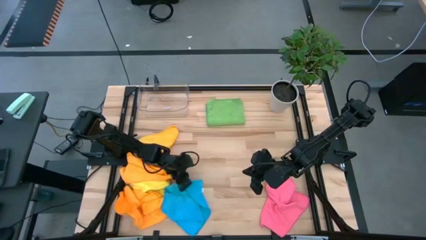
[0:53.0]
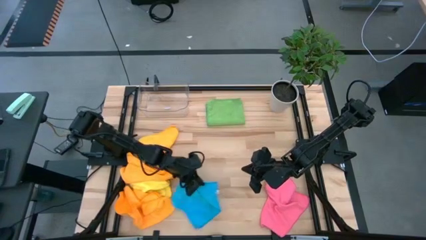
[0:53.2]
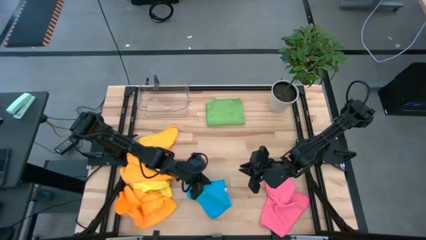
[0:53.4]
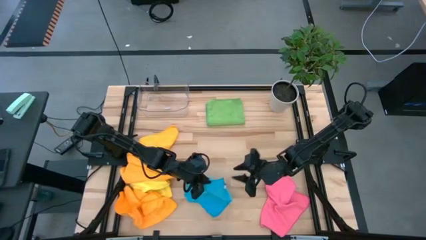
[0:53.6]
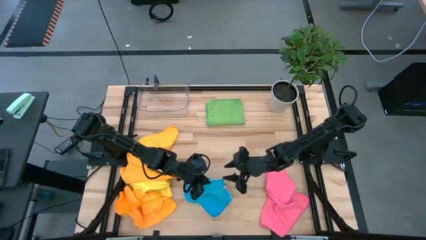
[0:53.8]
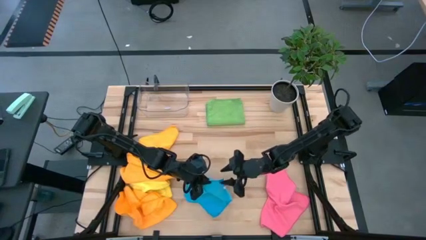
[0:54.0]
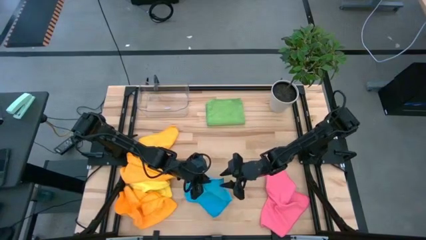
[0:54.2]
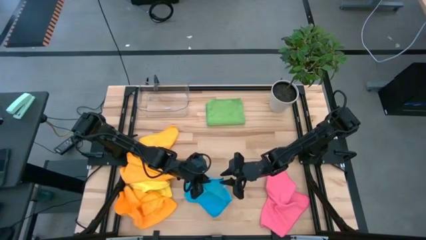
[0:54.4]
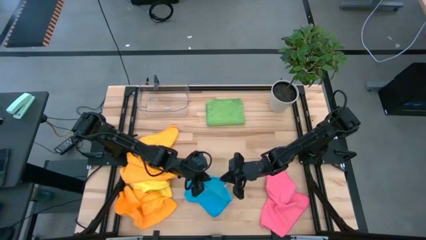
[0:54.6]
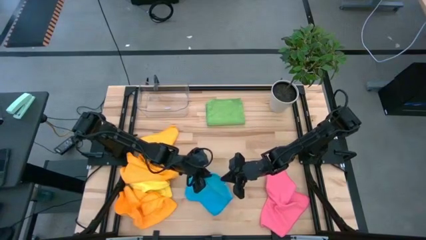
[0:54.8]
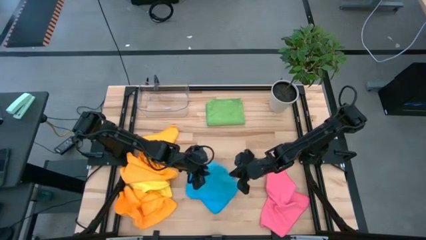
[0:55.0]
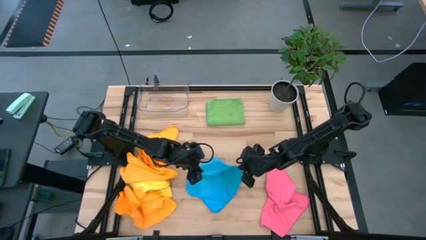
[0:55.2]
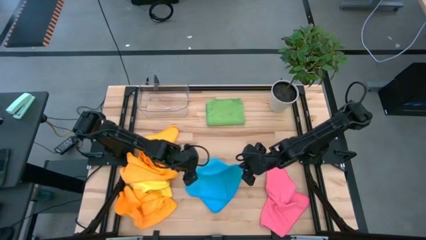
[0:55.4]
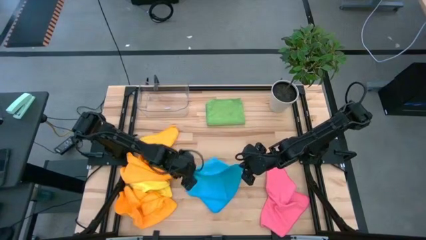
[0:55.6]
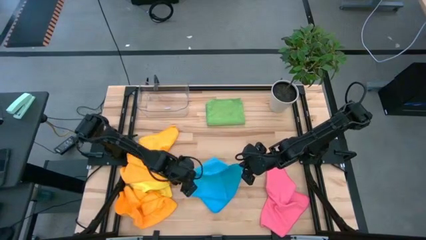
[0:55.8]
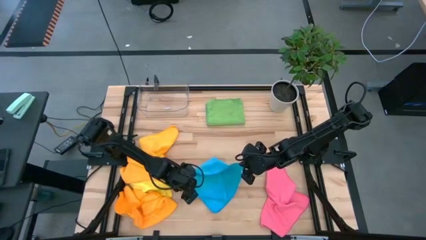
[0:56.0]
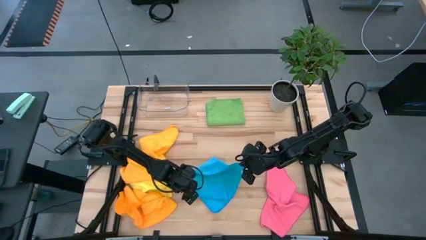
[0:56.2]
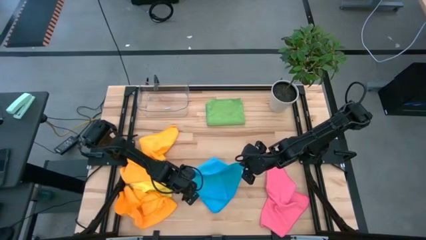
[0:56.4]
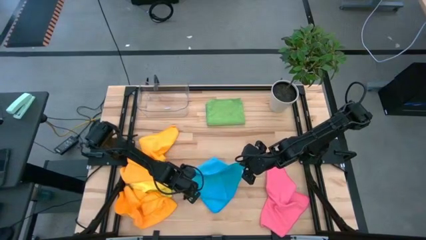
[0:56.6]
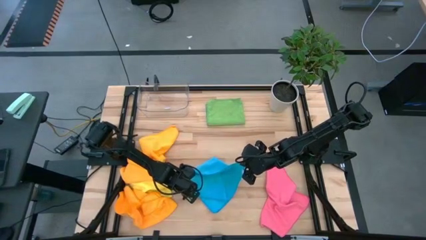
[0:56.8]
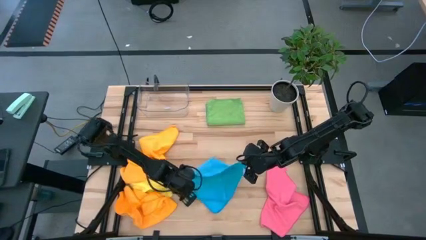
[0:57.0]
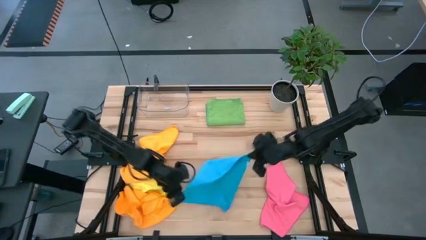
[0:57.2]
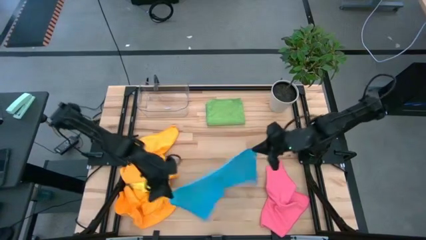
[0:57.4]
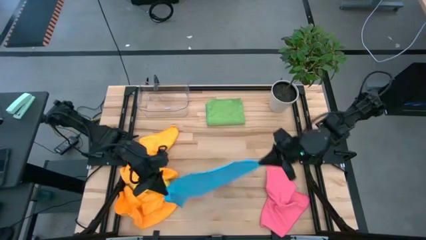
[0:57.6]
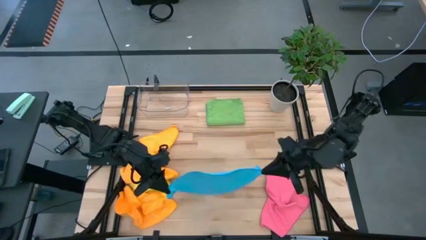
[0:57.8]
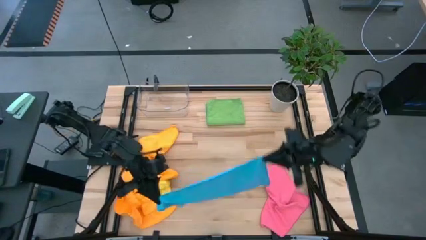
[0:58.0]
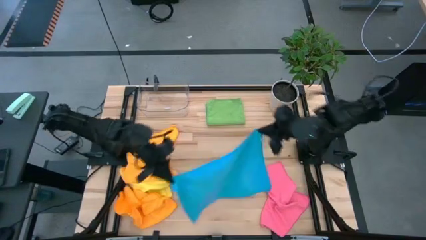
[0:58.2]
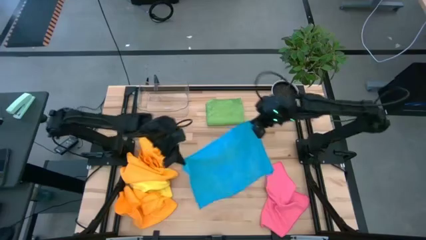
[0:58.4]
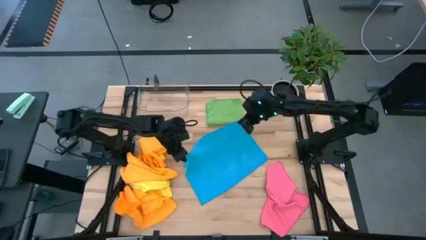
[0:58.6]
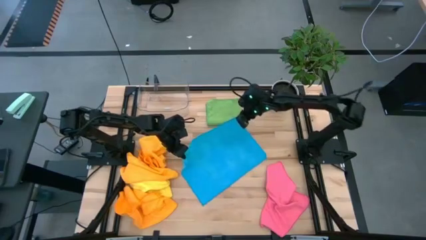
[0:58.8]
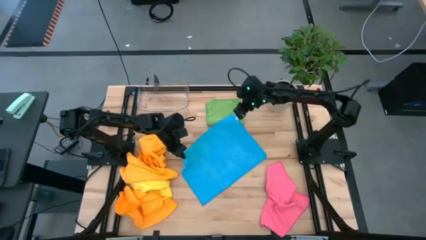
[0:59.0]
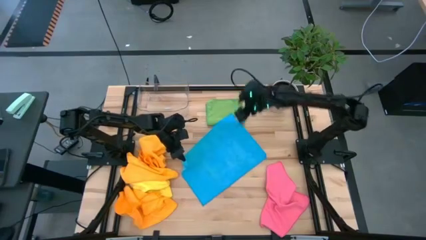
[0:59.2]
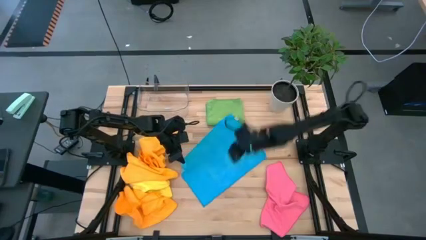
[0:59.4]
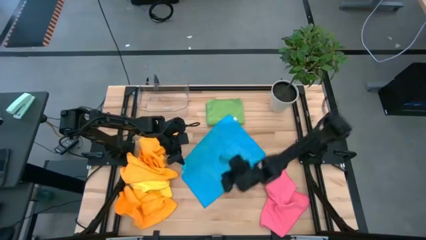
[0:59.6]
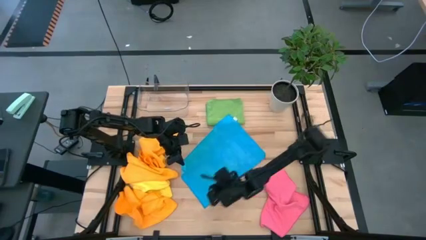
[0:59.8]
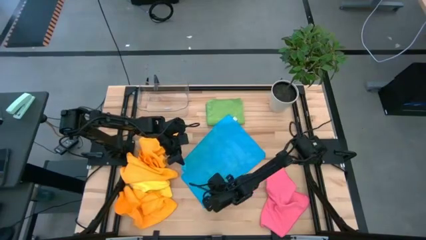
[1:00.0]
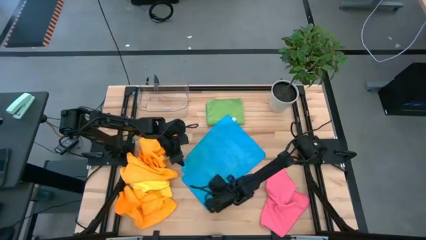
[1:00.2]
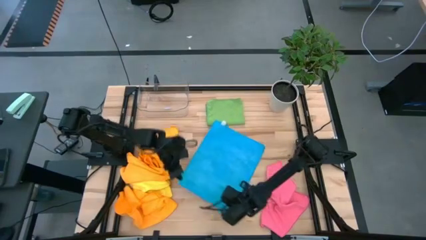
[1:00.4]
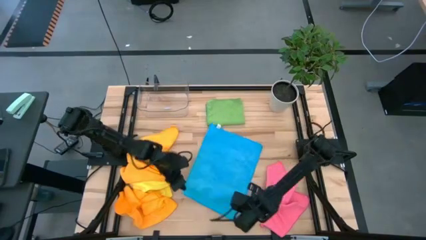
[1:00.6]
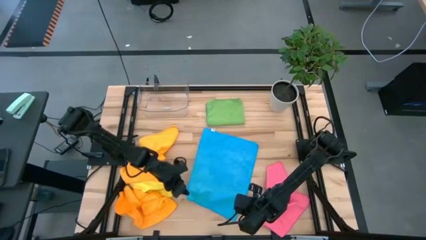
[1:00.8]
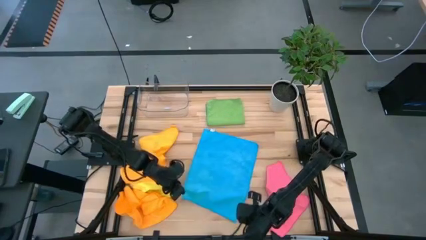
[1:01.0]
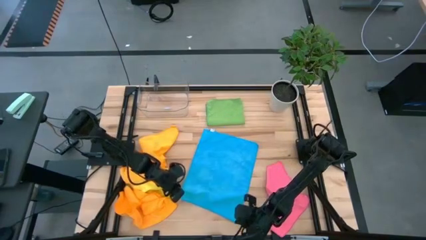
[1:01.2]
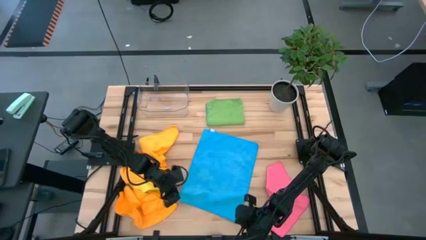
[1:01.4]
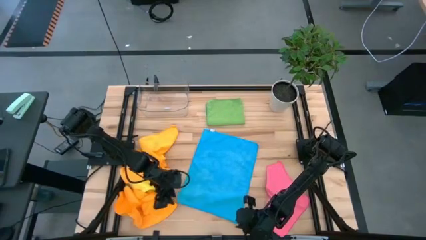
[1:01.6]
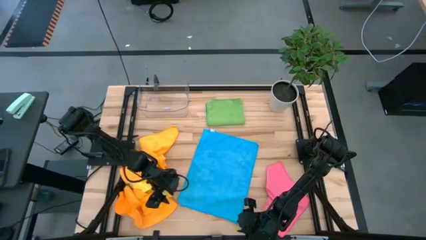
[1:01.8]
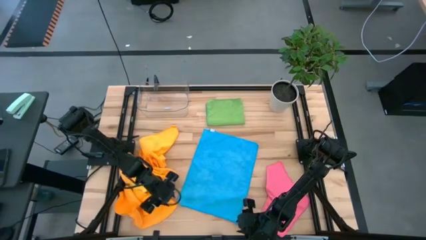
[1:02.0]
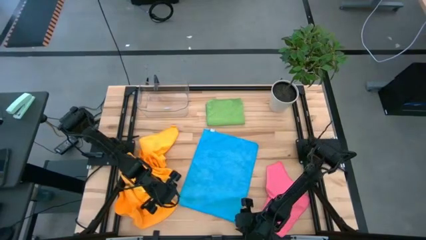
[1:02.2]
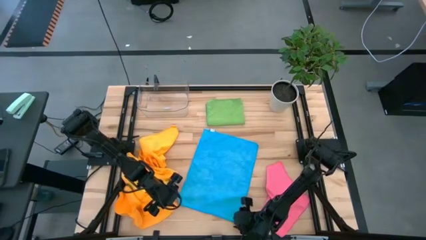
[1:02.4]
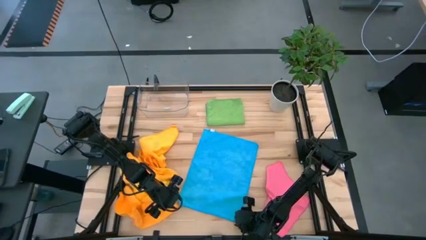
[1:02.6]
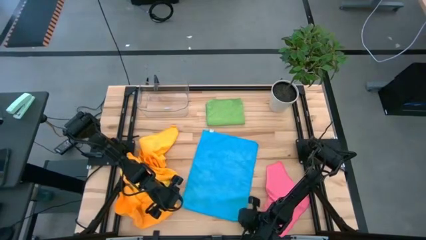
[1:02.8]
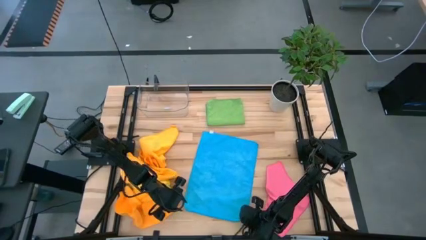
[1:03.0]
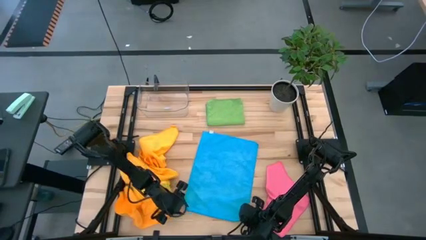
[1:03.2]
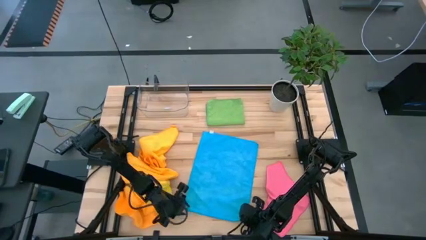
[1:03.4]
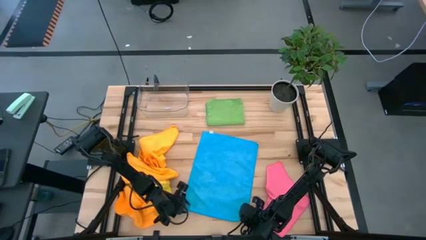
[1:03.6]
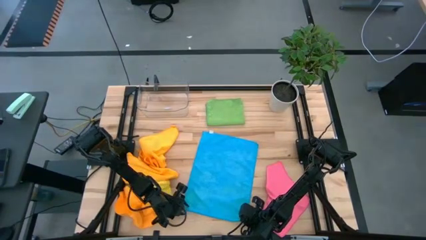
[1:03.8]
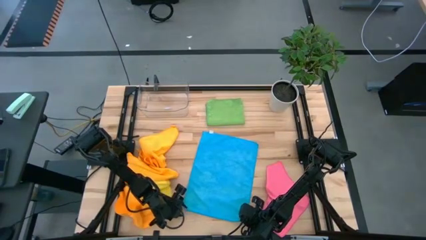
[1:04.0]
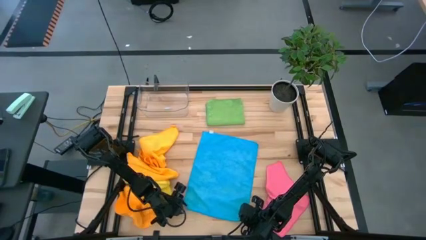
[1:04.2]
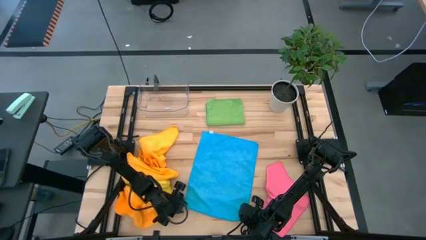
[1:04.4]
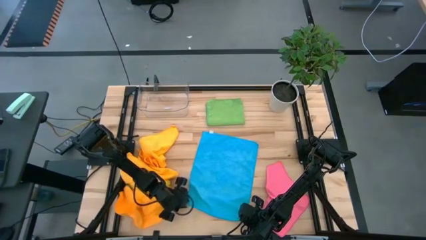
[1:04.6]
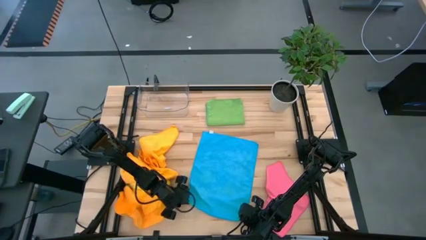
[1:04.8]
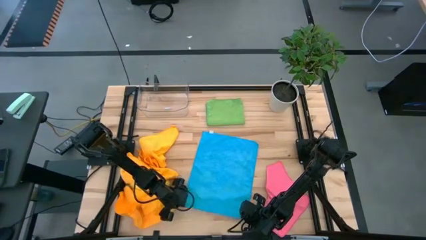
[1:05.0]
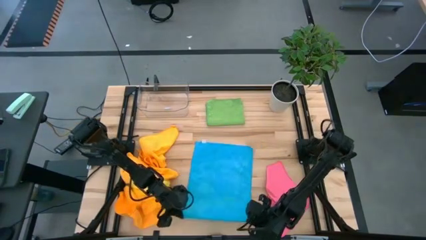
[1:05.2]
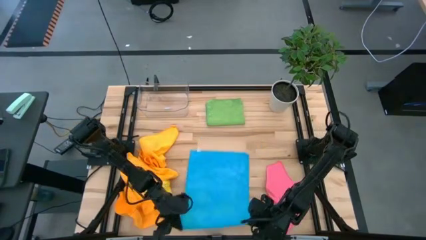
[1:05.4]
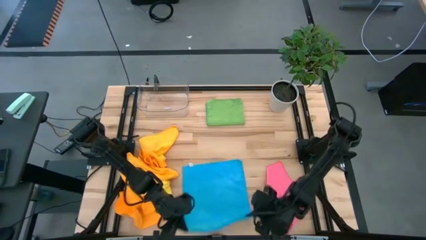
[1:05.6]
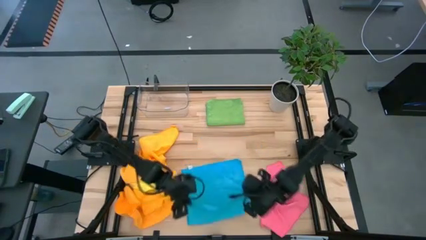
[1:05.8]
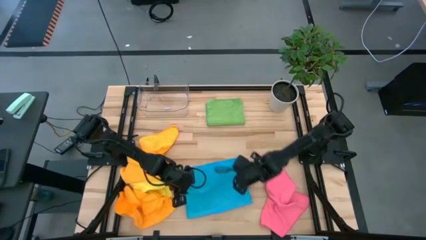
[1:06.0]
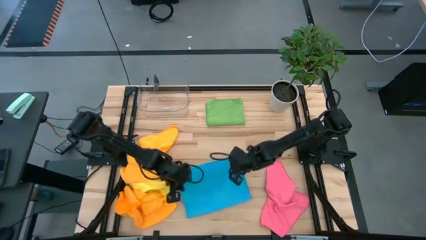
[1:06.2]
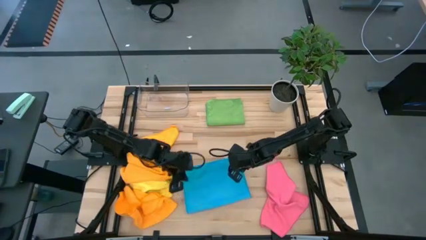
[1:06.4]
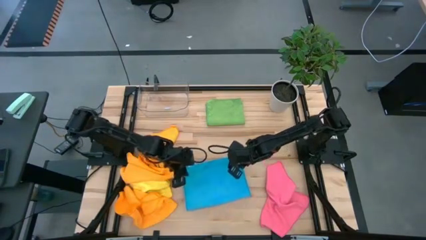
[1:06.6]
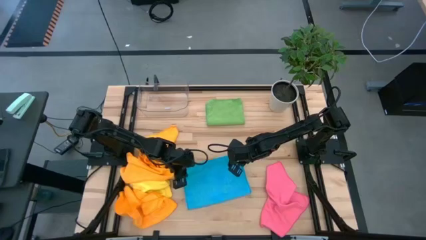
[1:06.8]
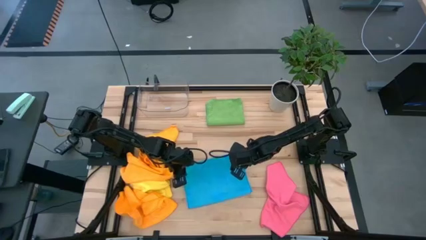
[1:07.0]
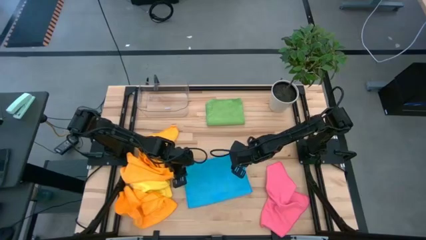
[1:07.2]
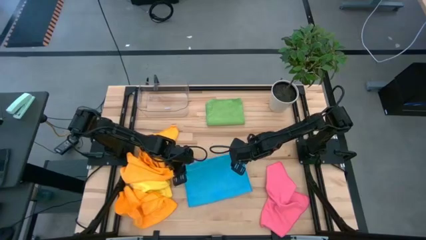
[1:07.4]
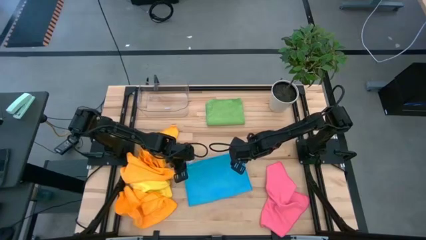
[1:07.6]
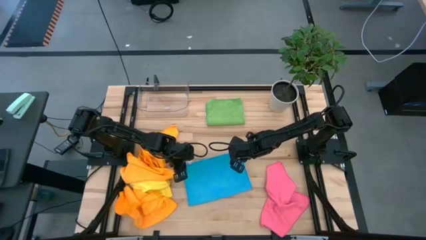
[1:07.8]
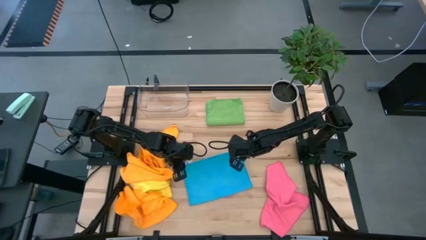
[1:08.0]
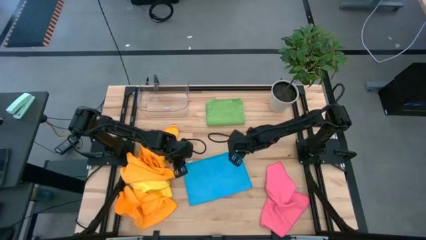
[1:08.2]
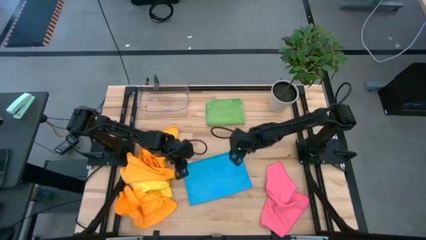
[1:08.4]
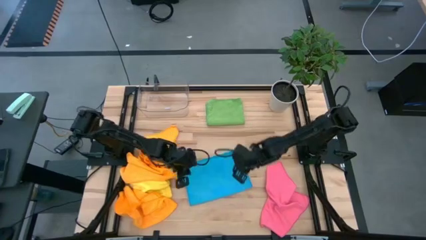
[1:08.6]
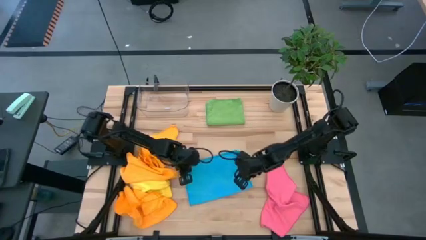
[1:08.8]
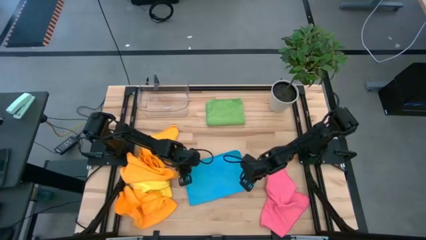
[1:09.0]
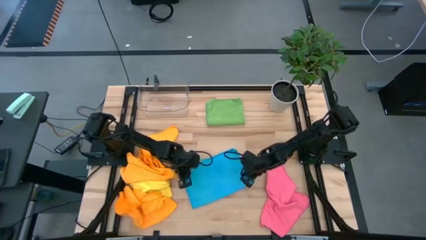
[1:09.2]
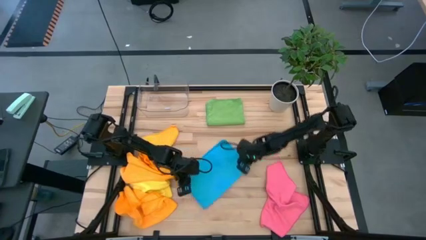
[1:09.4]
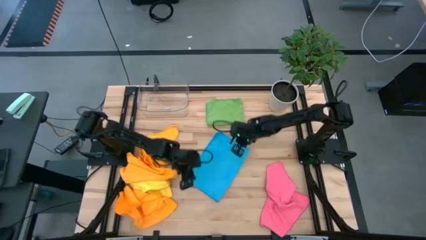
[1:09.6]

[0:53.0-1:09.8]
Task: Fold microfiber towels
Fold the blue towel
